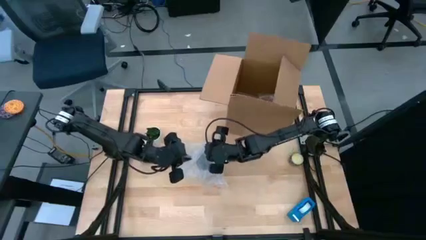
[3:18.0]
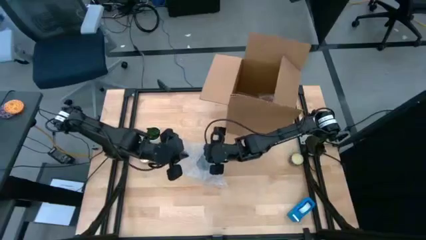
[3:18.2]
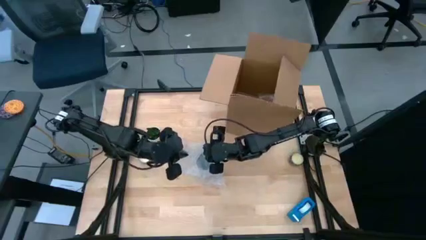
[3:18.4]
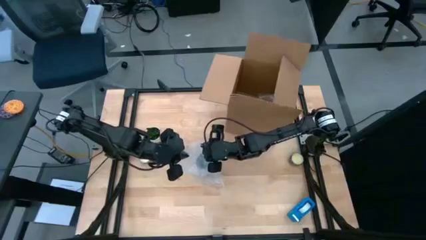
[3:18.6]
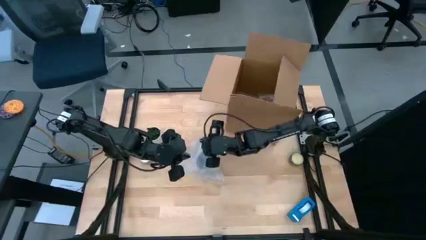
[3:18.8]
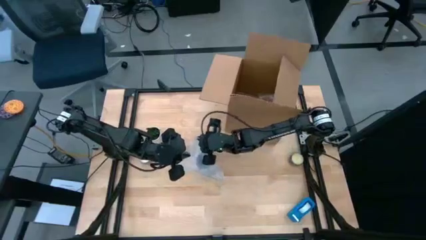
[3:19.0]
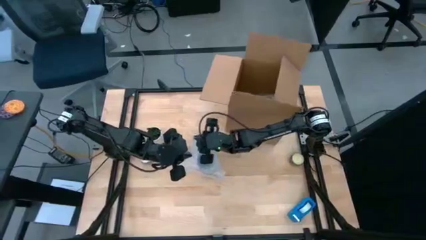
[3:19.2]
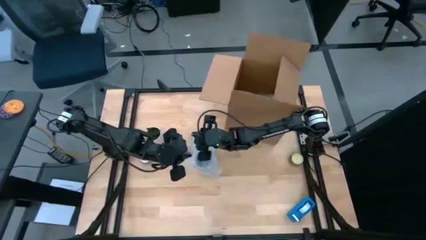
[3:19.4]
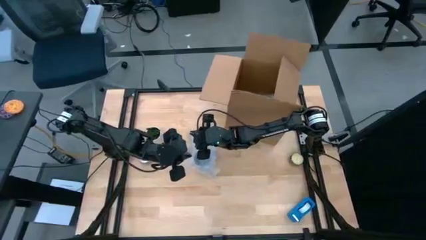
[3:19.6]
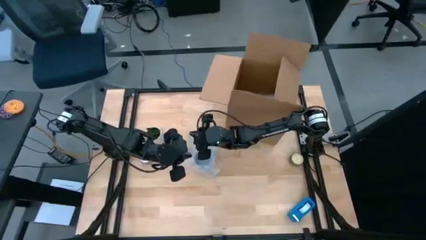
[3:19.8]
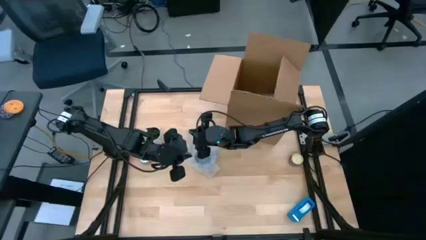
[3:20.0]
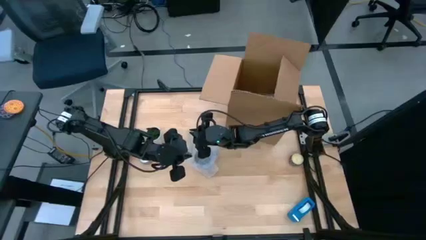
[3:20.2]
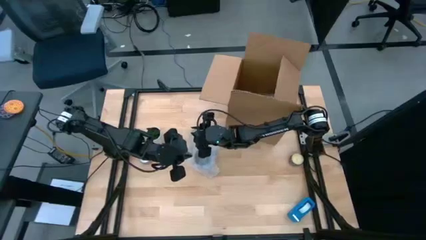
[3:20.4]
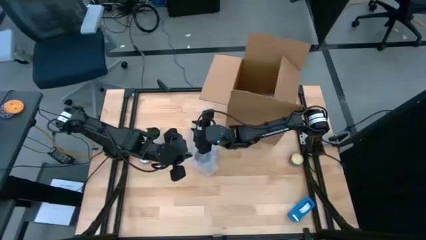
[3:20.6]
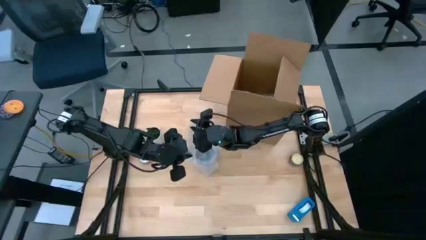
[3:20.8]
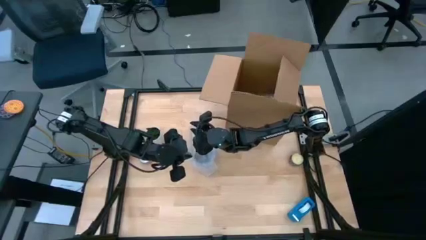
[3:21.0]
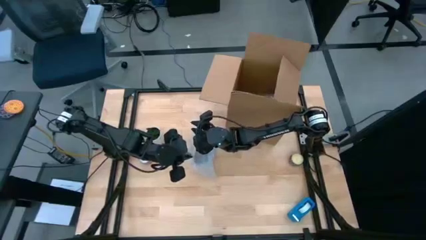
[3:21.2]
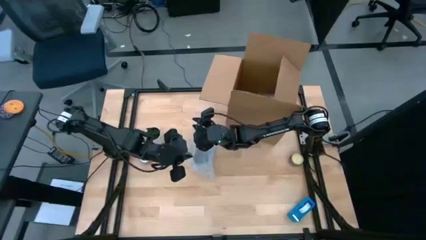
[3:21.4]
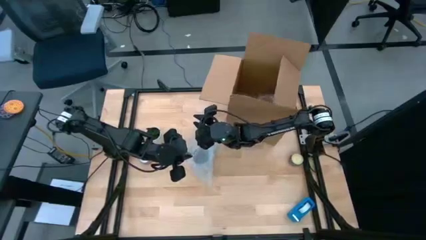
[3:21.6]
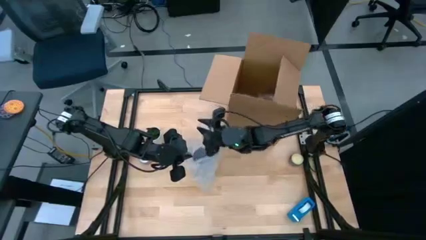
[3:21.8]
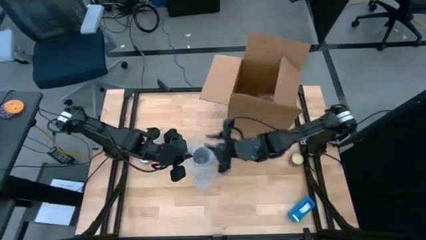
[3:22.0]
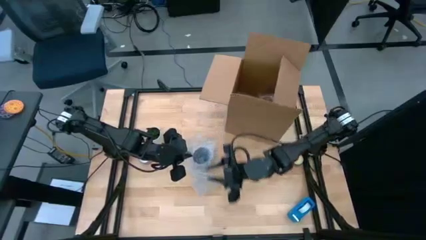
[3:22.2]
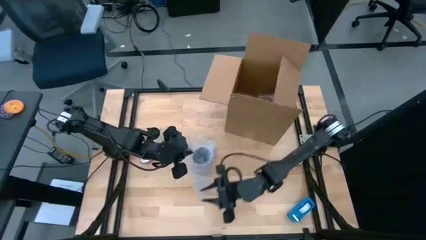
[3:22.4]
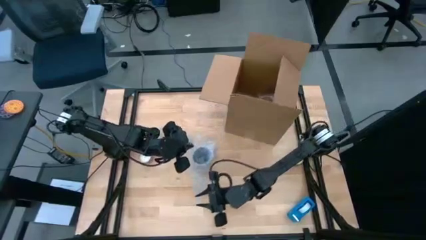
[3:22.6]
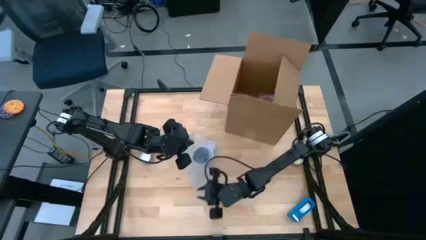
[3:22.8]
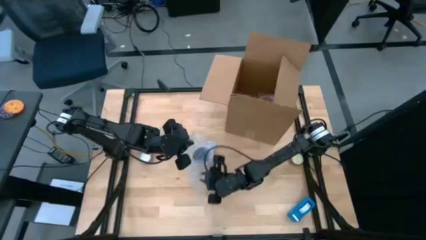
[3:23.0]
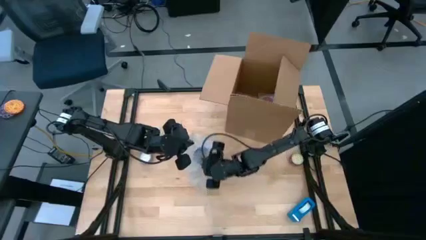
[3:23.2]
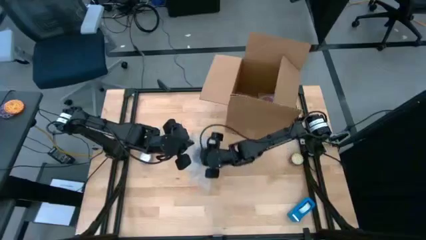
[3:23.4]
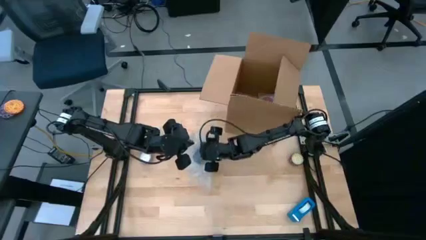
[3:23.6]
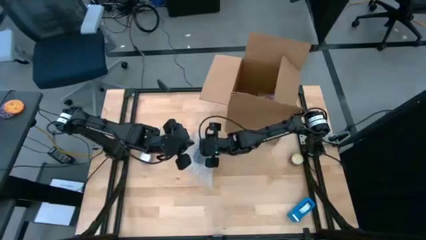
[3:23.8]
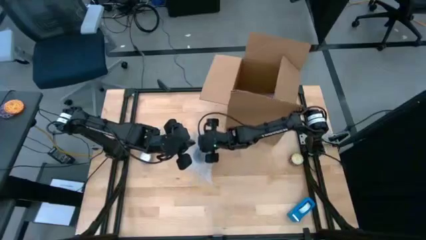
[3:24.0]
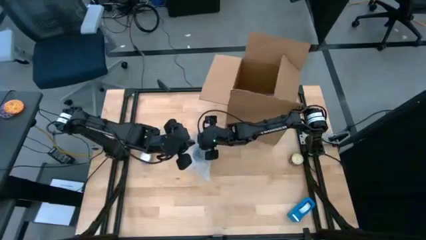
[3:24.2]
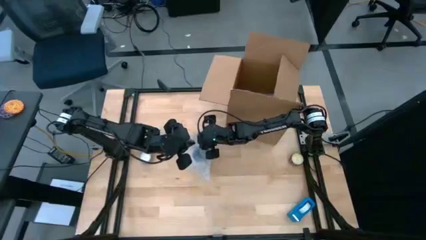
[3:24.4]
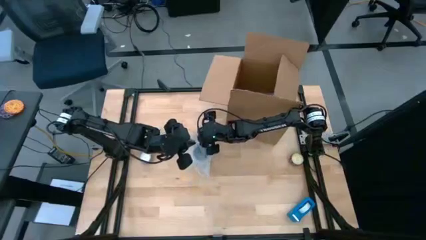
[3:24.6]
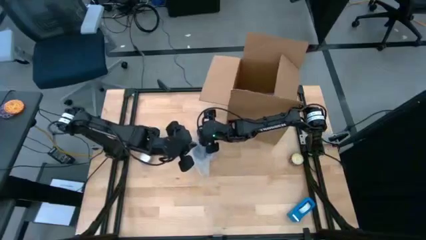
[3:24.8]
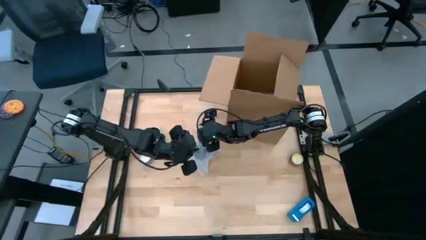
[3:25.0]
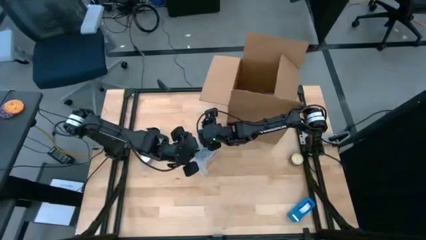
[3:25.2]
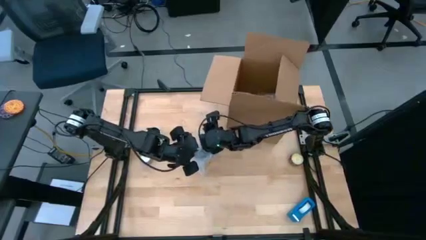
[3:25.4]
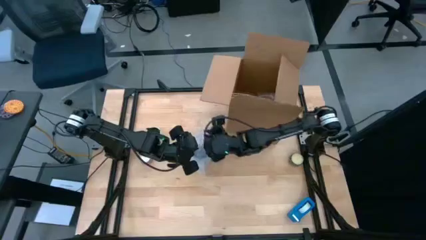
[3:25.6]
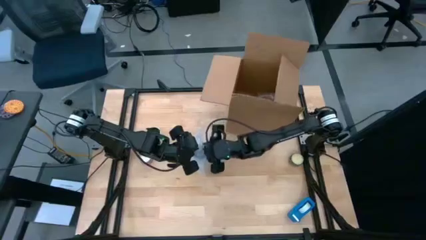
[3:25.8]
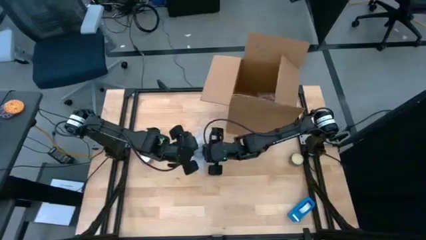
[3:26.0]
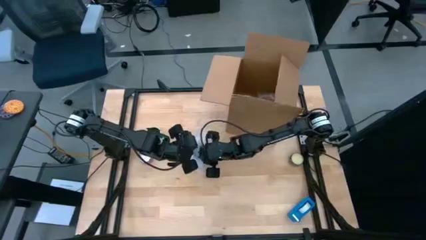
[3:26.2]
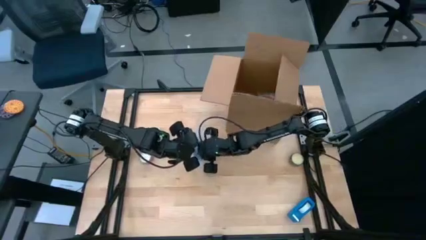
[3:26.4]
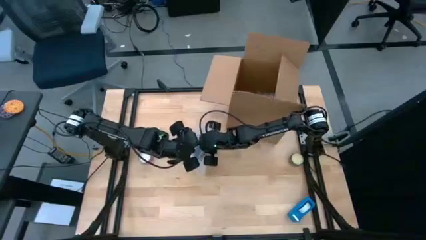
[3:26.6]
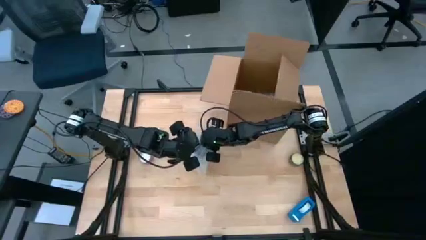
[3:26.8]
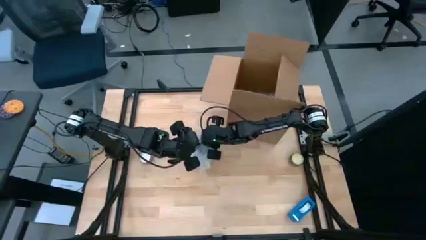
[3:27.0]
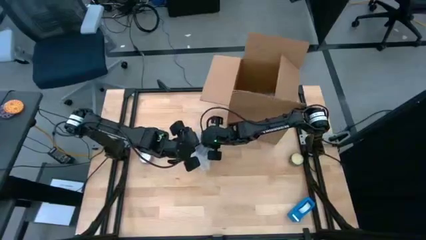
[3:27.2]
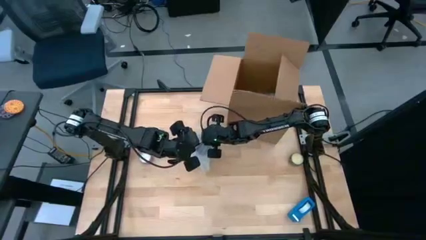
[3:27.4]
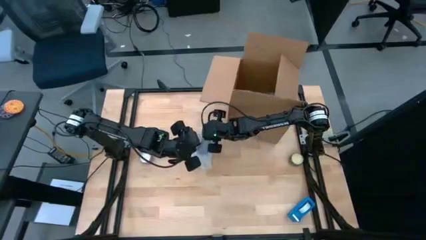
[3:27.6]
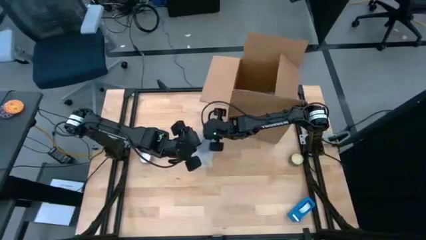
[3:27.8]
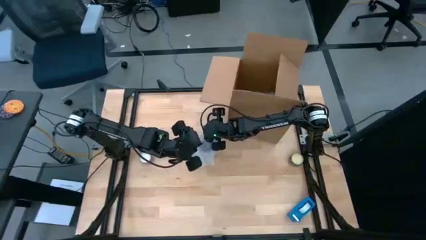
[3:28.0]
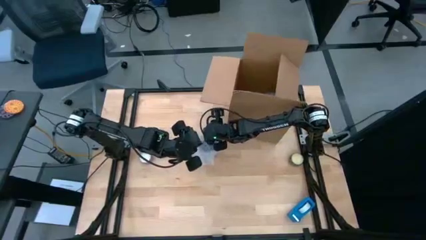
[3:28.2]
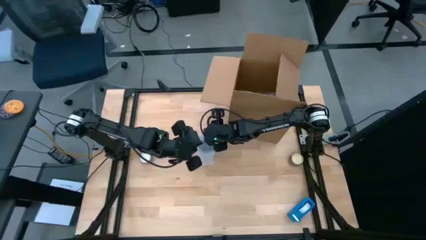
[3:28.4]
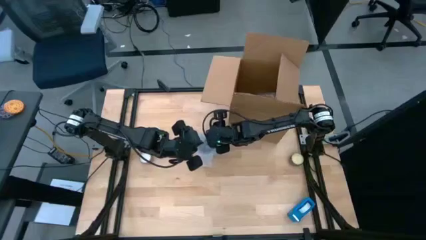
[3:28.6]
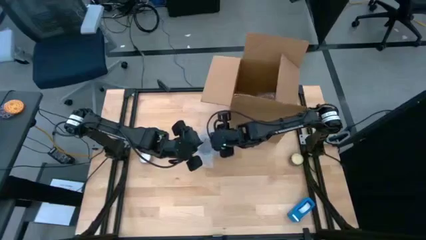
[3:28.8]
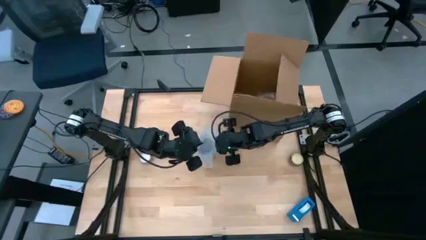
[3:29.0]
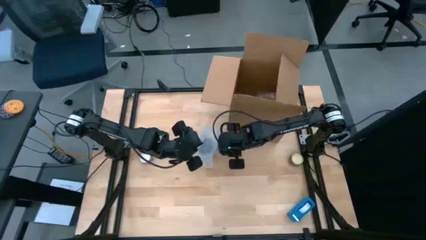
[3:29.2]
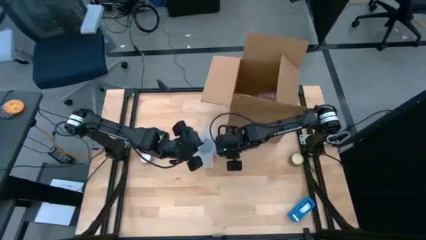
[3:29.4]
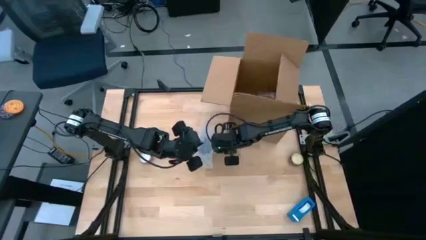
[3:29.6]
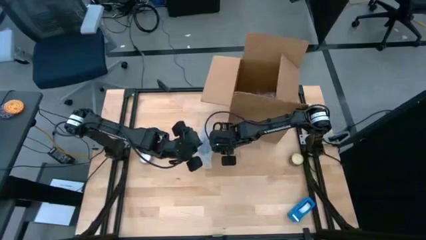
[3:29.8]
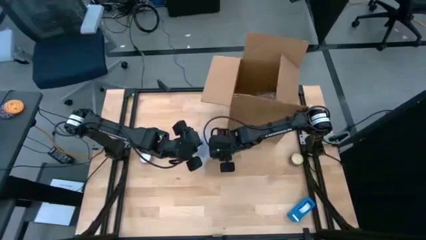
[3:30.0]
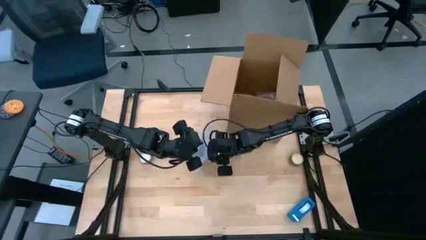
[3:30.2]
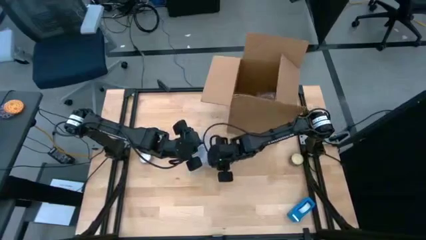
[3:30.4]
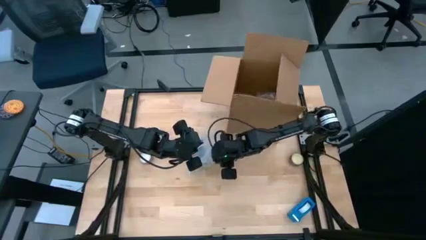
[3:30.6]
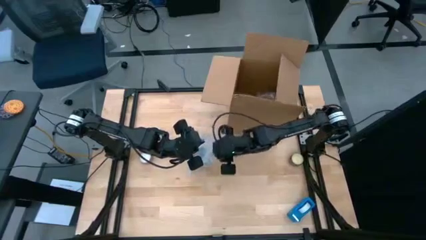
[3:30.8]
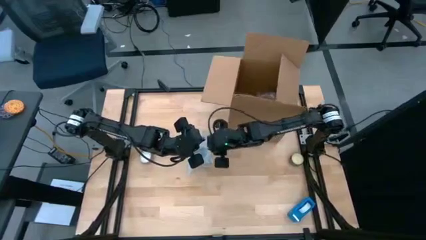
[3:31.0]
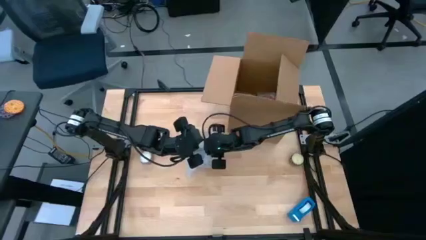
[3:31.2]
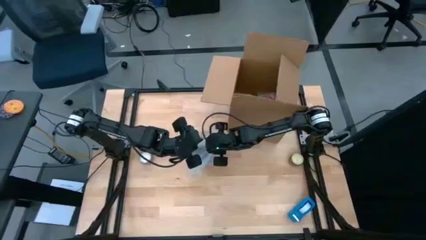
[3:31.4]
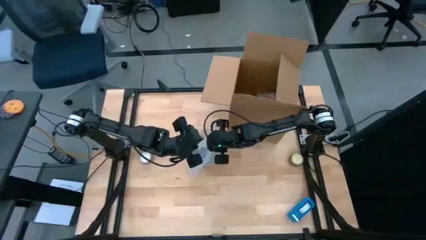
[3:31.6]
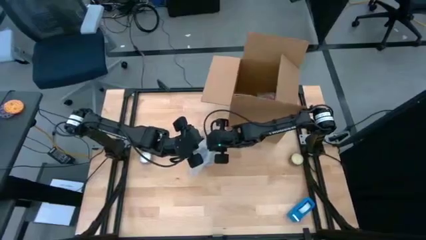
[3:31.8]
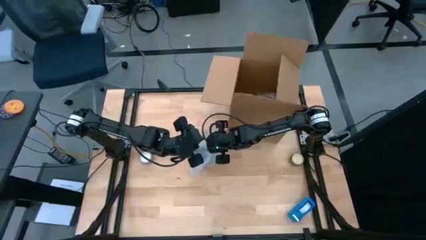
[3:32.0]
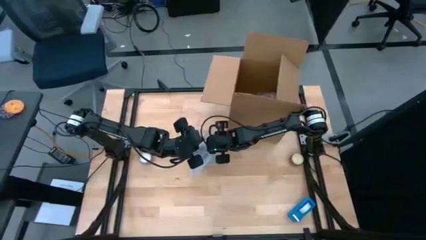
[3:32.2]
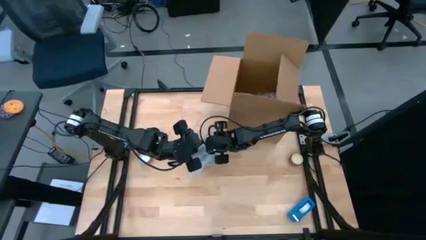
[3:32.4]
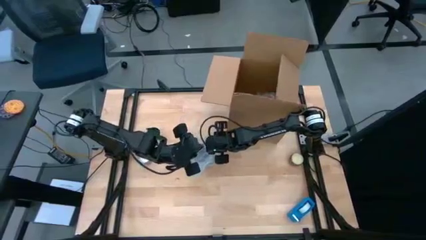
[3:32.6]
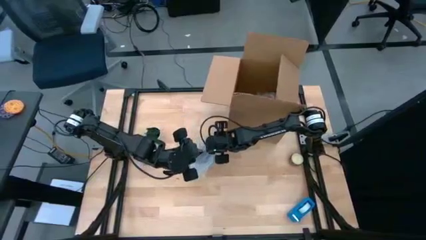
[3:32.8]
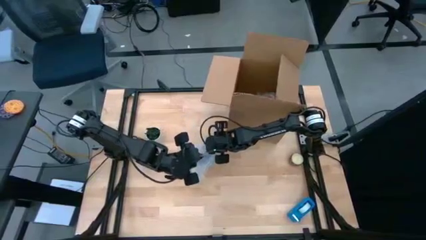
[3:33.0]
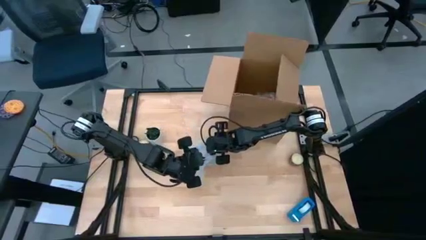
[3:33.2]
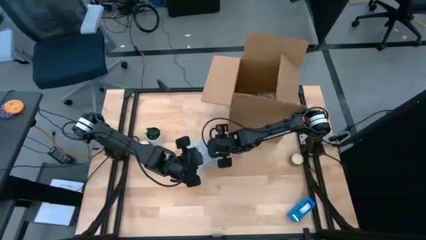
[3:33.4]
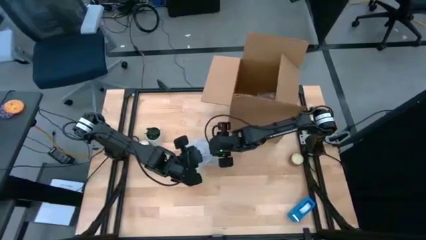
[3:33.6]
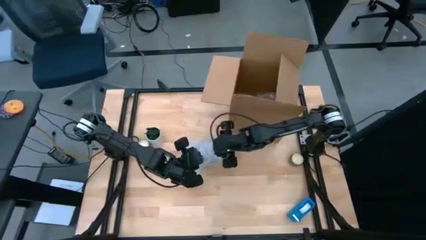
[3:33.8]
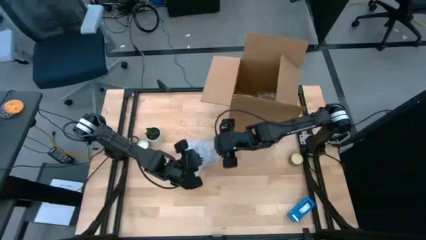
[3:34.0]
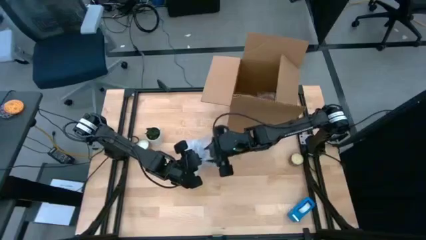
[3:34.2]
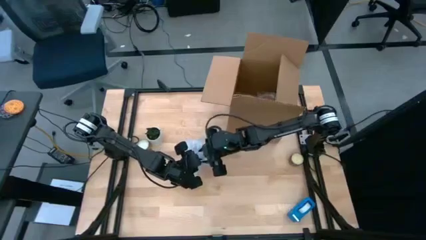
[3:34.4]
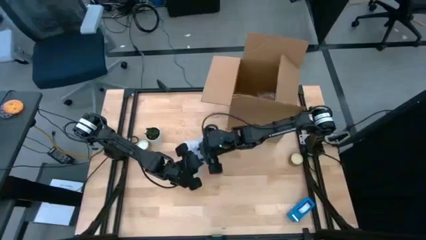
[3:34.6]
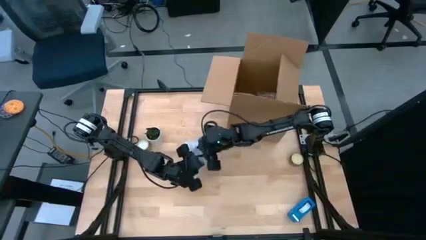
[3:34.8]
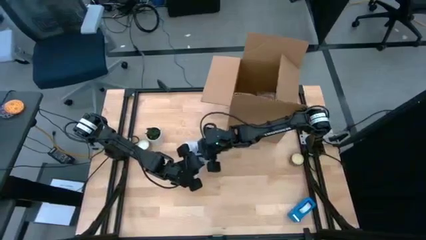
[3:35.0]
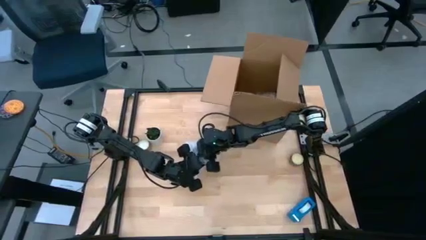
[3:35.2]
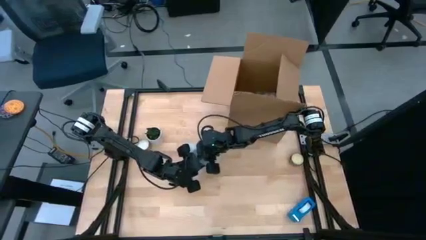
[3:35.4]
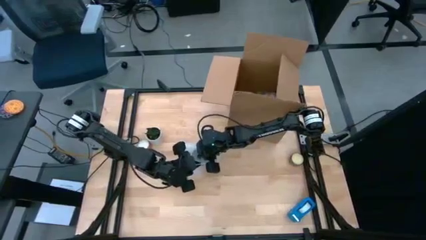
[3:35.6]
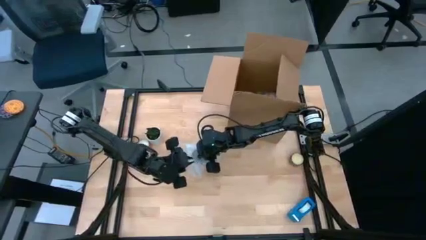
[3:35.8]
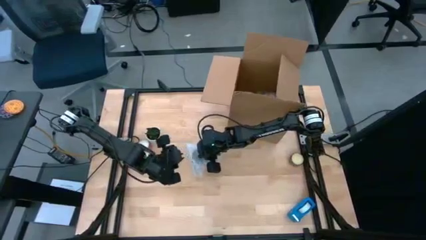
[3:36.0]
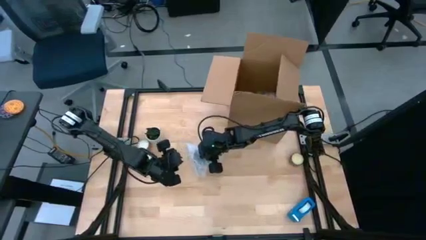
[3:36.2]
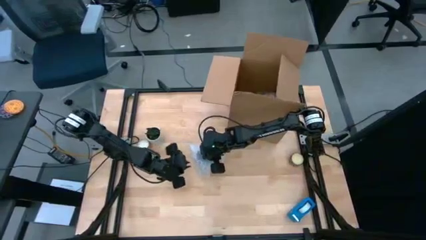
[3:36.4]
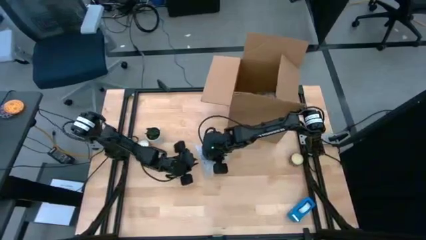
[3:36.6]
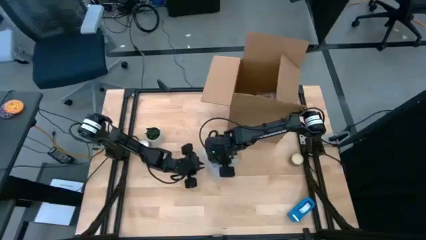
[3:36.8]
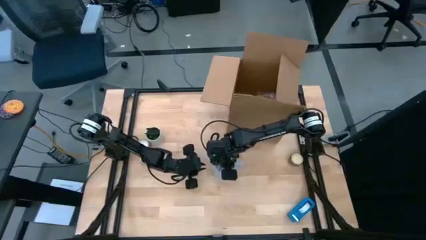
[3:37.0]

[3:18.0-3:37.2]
Task: wrap mug
Wrap the purple mug with the bubble wrap
